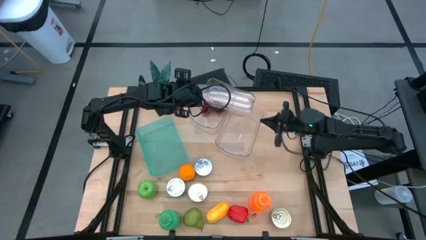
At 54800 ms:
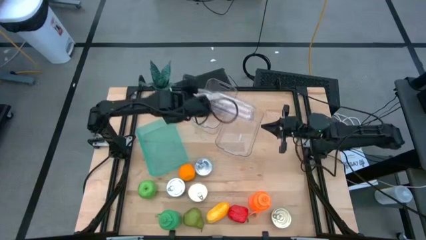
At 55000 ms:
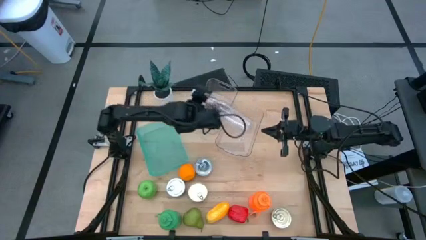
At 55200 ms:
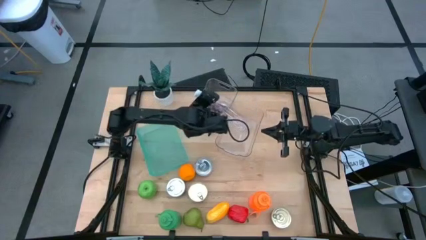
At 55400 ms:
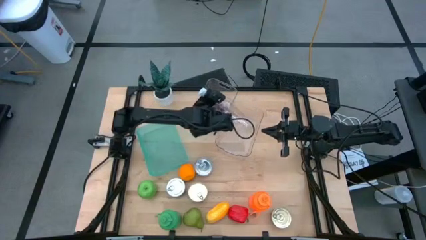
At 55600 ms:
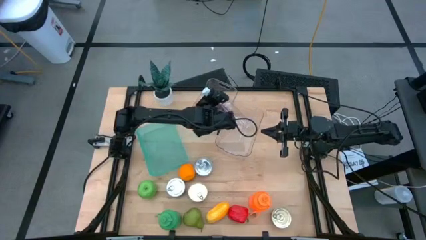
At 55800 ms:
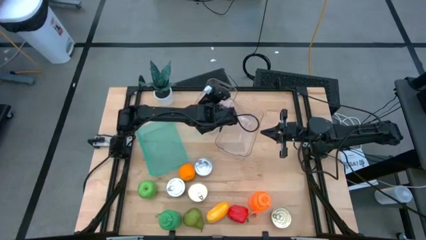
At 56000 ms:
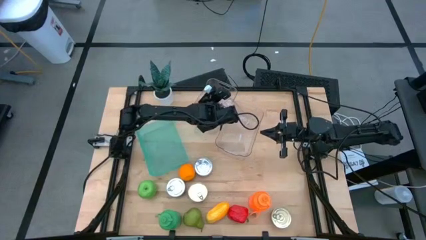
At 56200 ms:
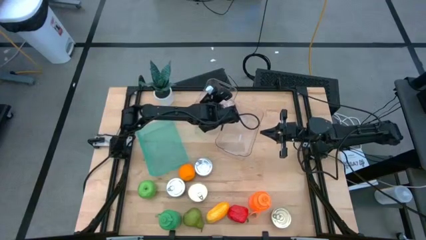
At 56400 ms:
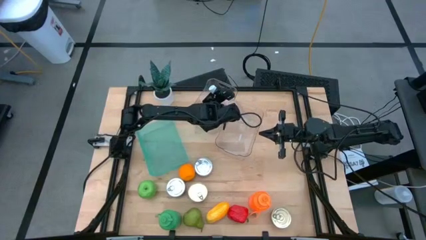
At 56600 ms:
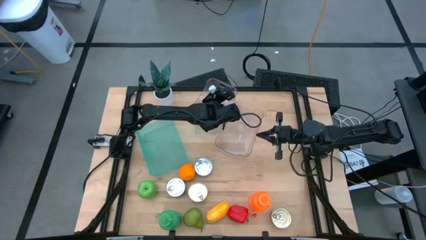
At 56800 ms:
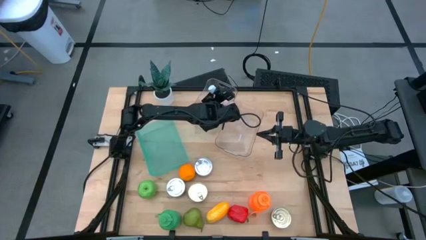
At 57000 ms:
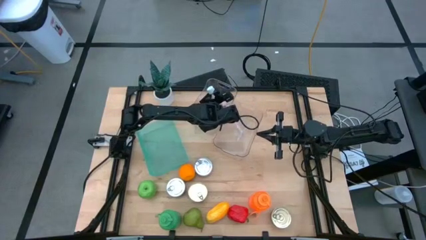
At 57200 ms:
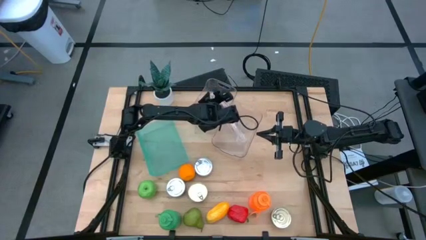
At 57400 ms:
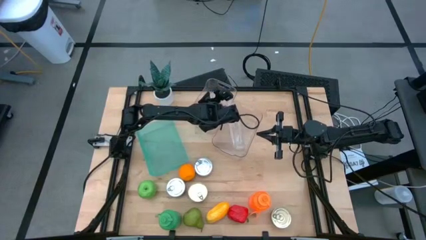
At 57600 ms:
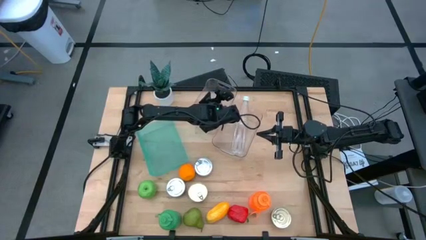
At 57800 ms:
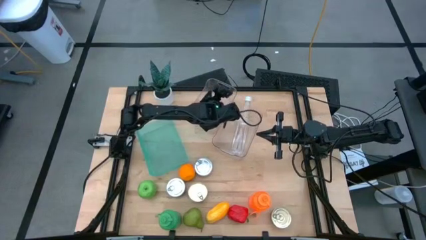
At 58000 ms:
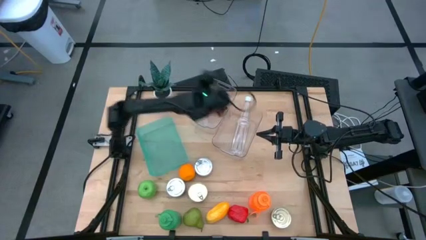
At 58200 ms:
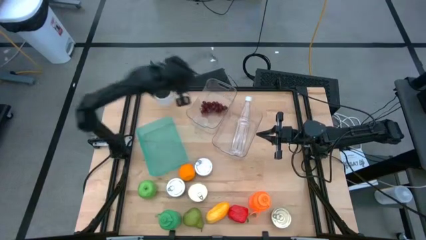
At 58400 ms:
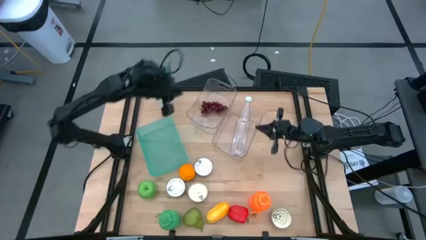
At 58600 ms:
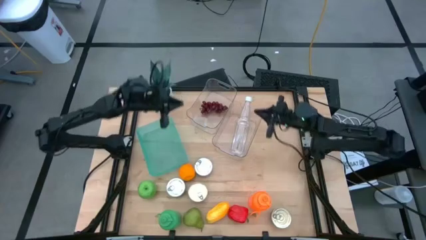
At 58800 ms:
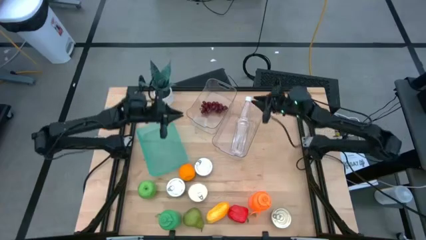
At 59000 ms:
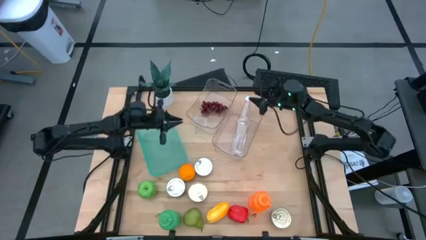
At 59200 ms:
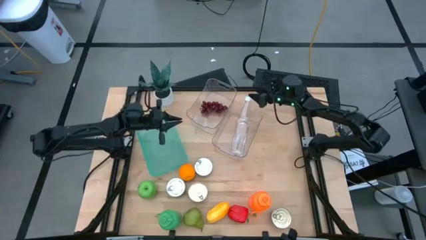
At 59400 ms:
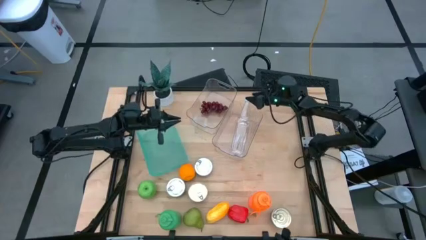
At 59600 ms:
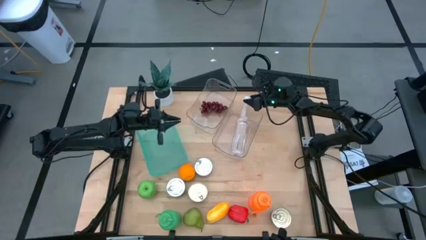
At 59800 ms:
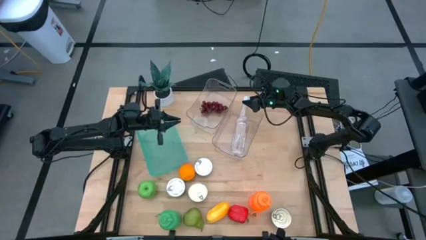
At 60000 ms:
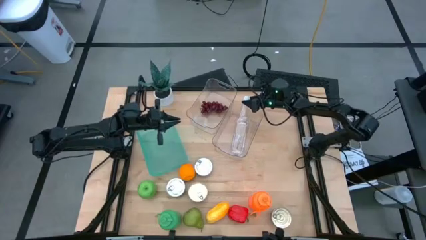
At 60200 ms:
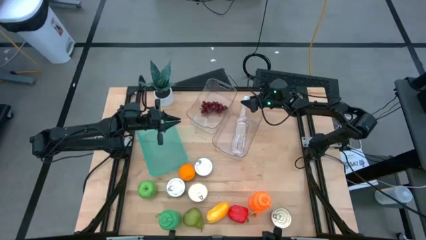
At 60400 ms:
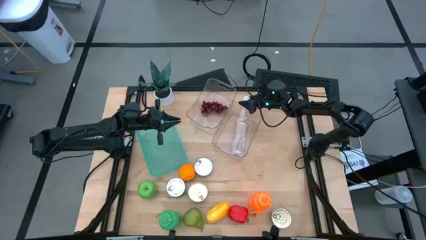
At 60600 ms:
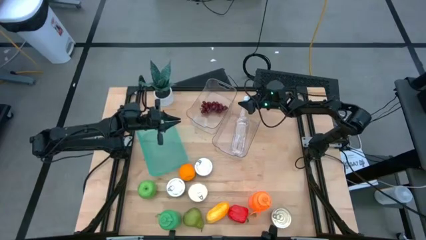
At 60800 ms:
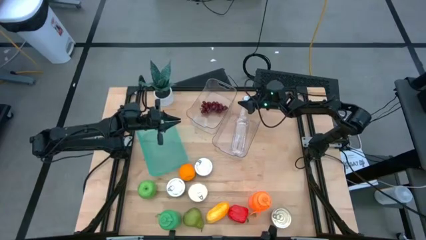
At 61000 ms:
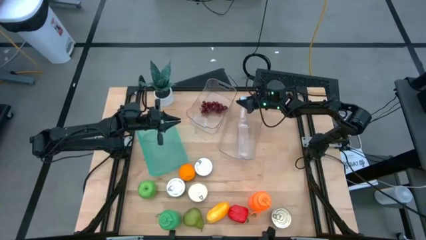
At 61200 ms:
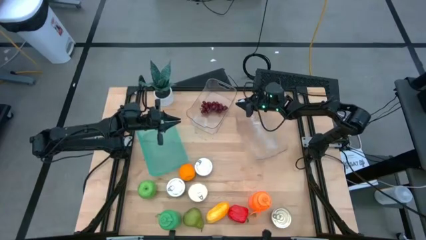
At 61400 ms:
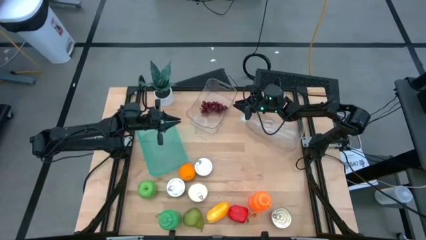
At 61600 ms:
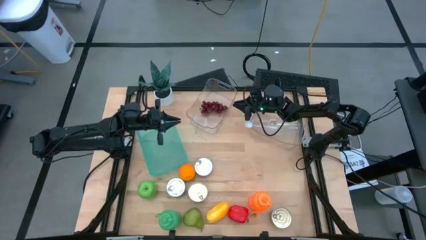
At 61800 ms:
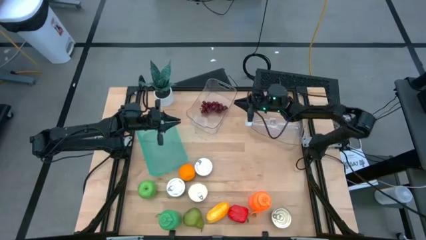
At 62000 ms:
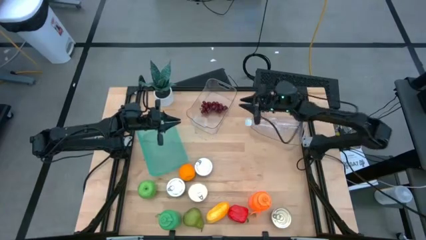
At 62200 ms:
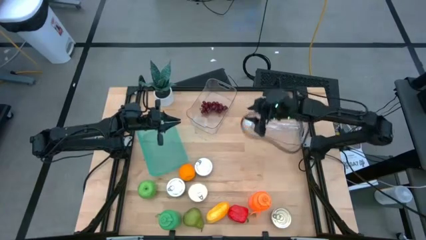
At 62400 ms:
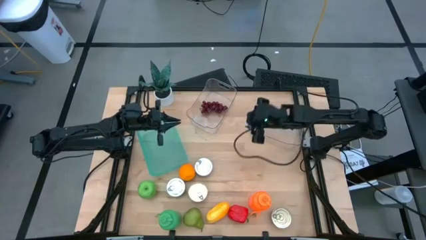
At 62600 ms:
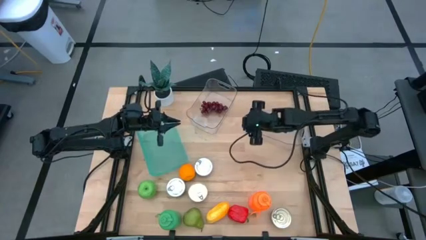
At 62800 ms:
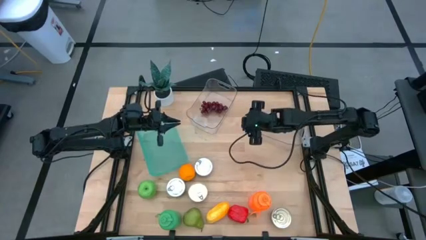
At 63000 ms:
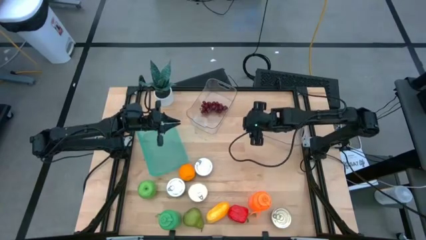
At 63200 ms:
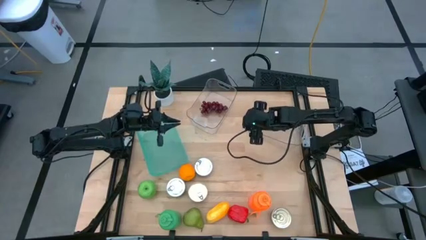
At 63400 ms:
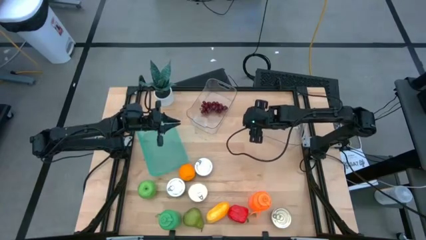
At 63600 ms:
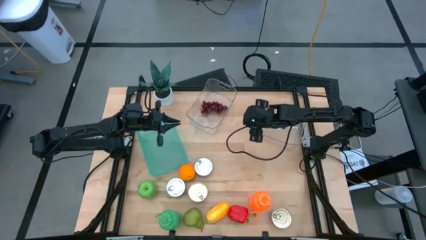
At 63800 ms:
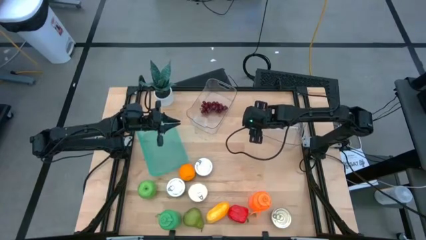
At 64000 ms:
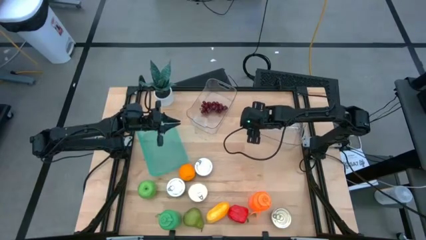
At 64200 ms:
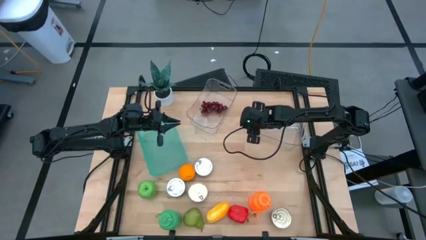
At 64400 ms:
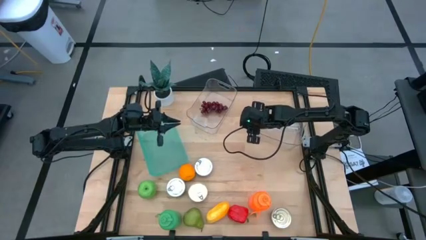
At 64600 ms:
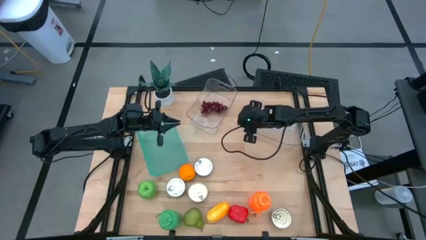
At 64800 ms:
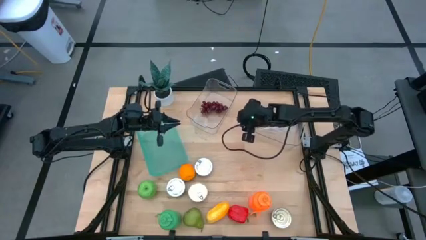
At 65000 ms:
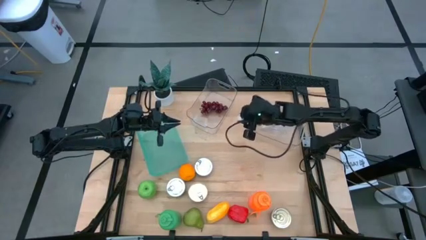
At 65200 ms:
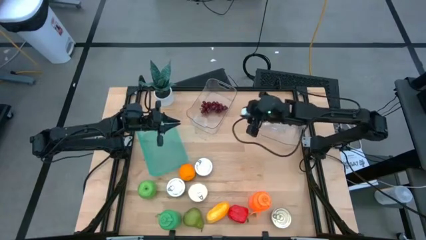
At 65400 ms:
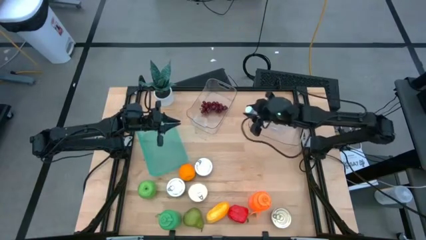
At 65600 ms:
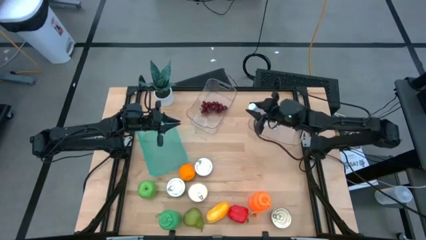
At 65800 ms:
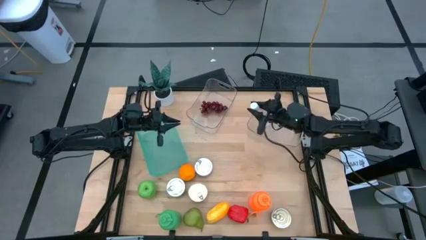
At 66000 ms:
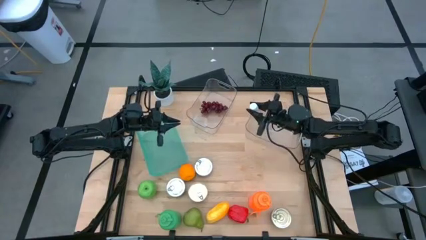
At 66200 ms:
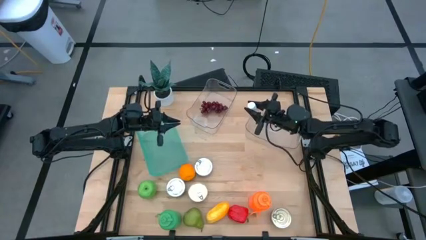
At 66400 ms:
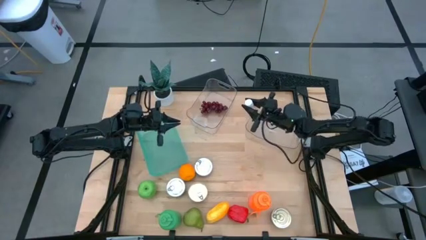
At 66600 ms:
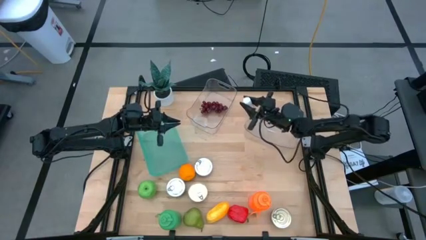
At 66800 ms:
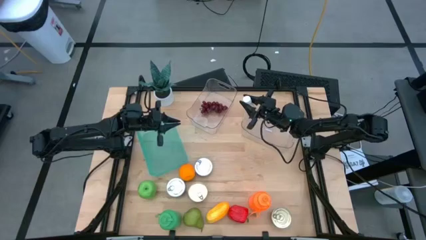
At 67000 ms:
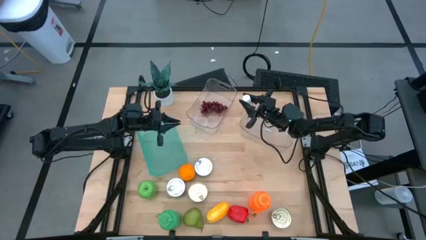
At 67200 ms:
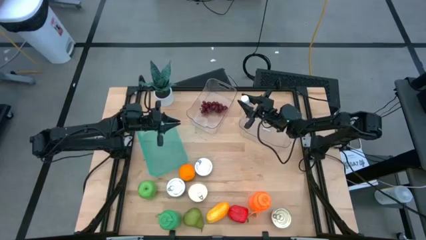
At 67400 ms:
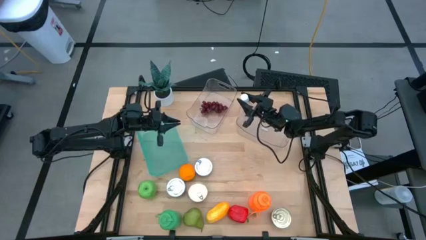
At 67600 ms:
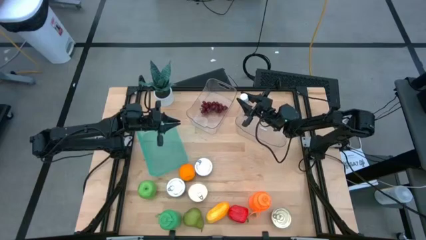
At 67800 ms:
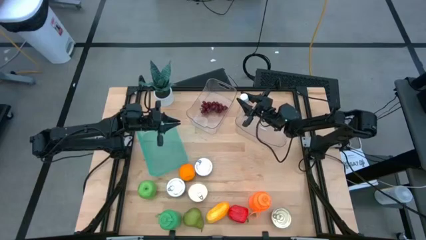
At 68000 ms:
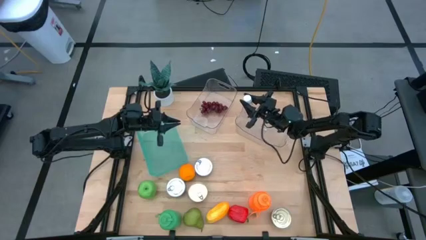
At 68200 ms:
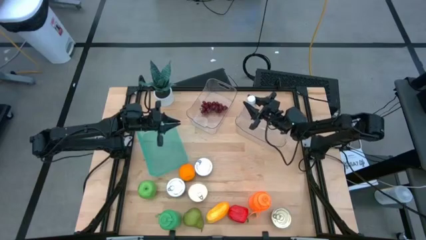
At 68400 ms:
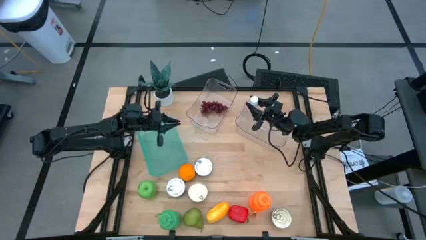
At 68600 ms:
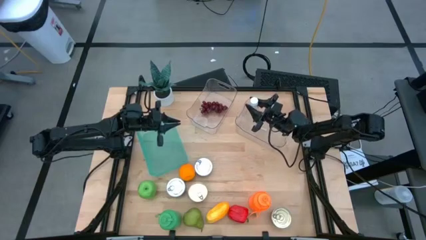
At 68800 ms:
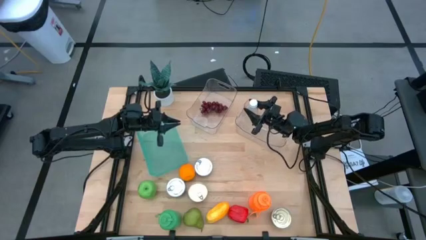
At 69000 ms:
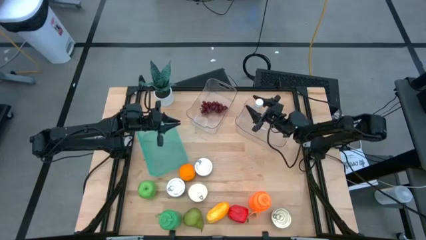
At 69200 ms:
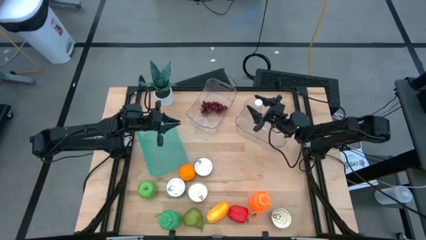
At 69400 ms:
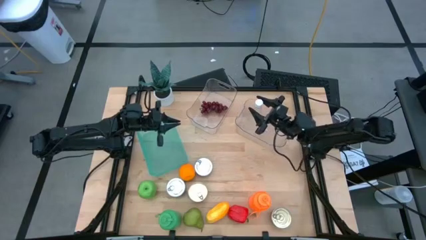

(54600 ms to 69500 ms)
Task: Pick & Place Food Item
Put the transparent water bottle into the right transparent bin
